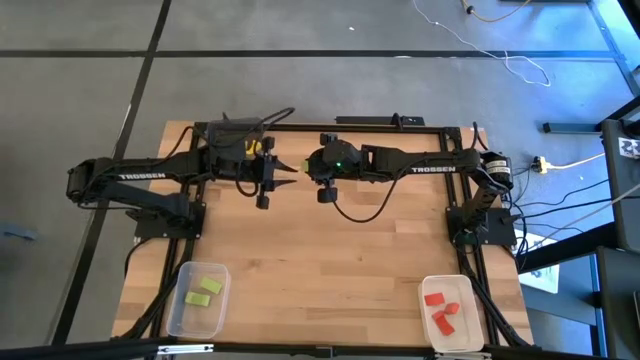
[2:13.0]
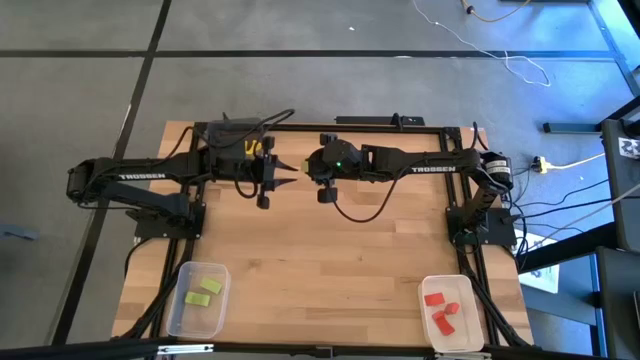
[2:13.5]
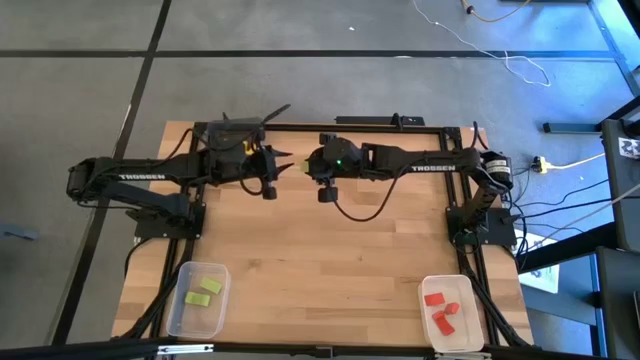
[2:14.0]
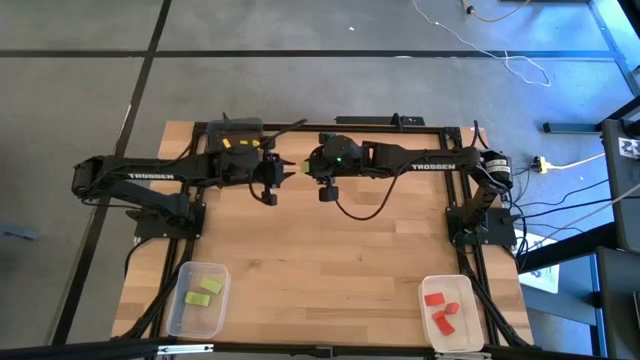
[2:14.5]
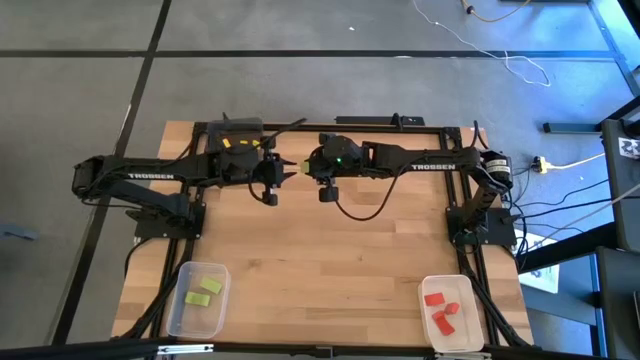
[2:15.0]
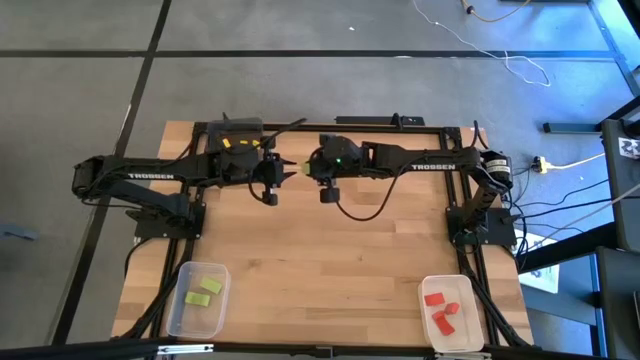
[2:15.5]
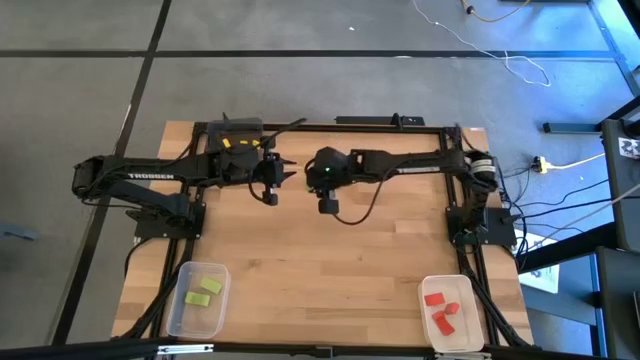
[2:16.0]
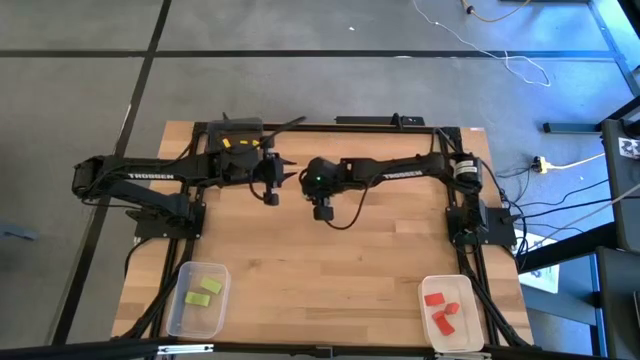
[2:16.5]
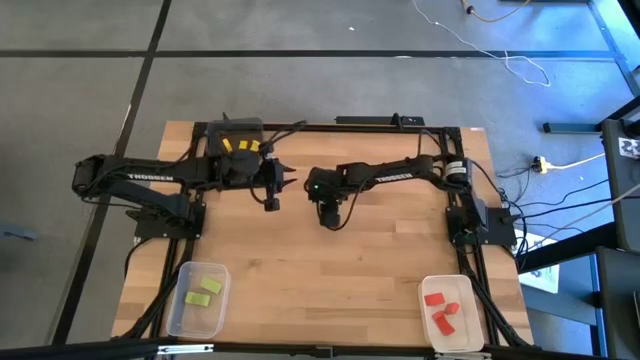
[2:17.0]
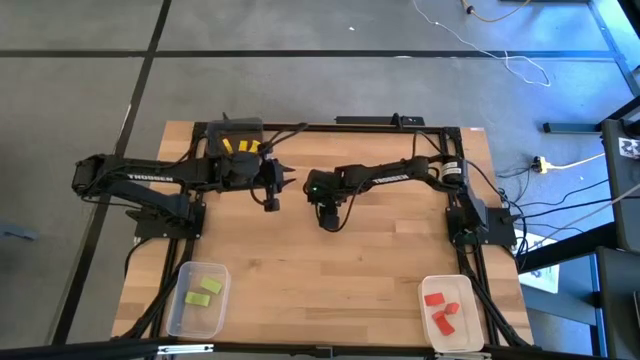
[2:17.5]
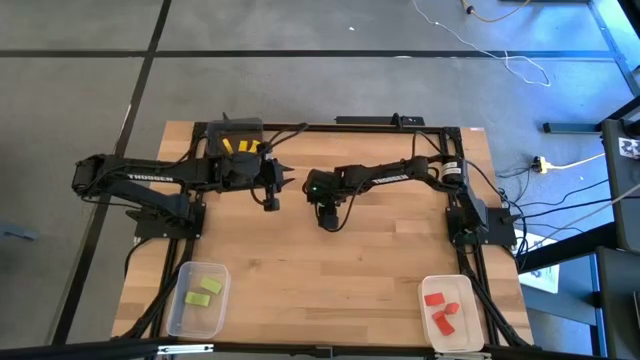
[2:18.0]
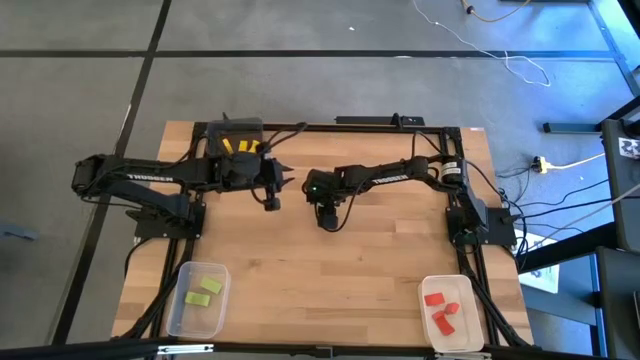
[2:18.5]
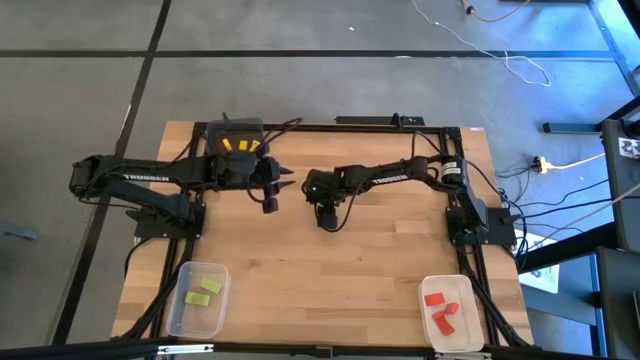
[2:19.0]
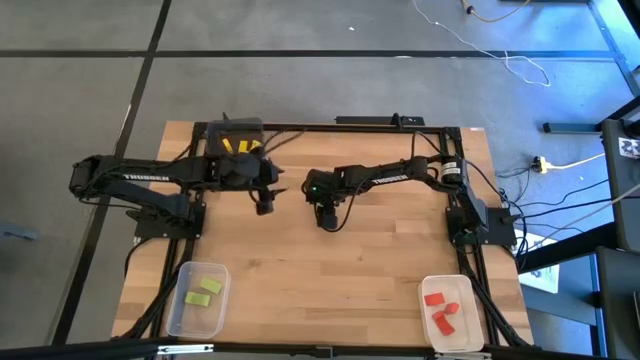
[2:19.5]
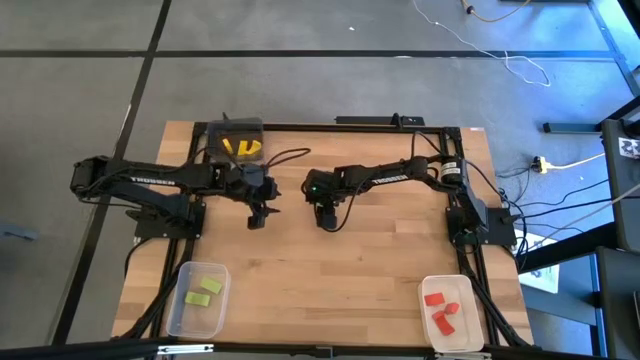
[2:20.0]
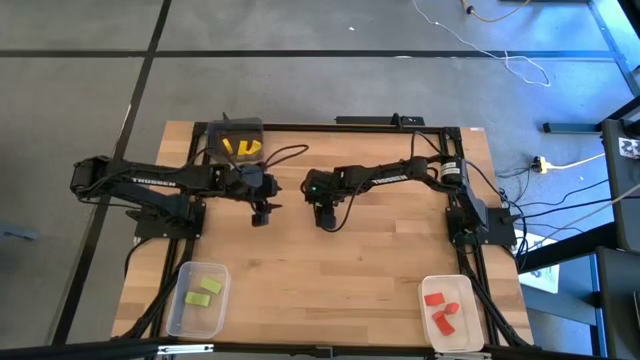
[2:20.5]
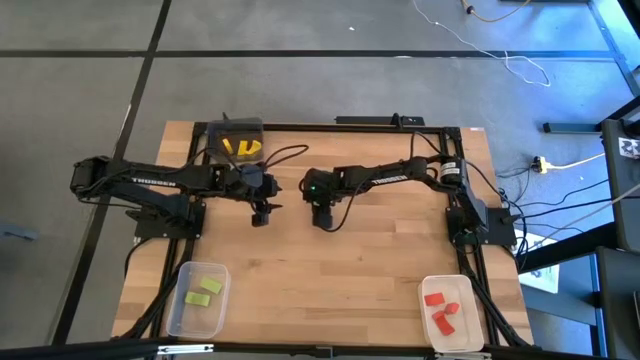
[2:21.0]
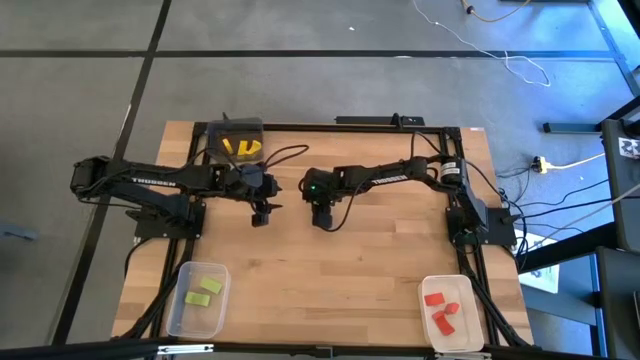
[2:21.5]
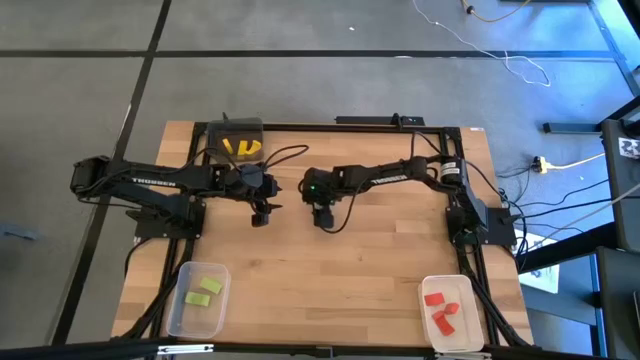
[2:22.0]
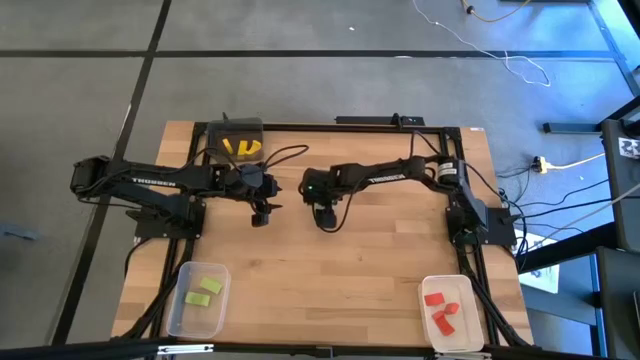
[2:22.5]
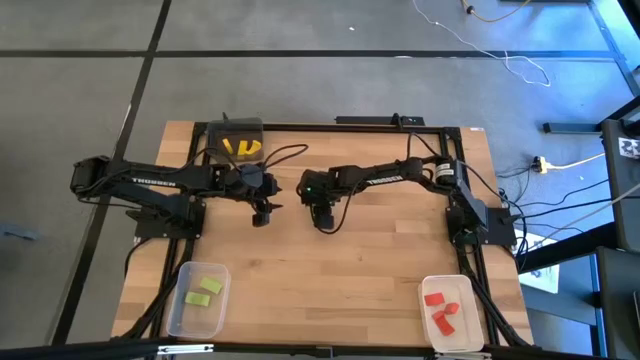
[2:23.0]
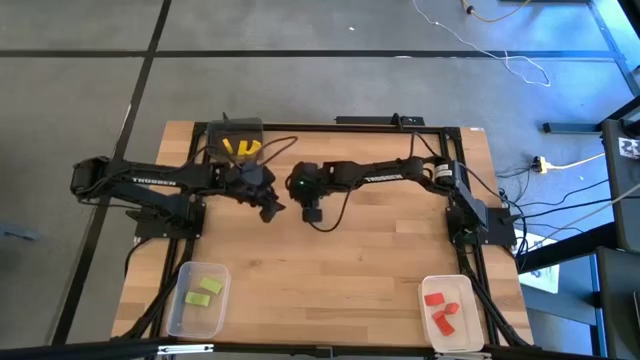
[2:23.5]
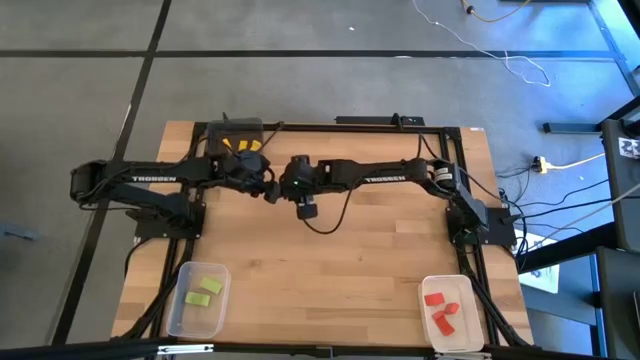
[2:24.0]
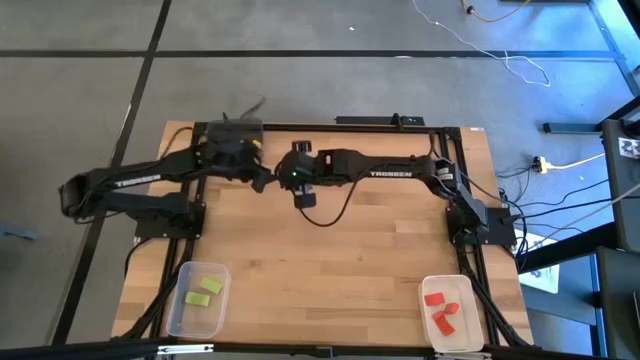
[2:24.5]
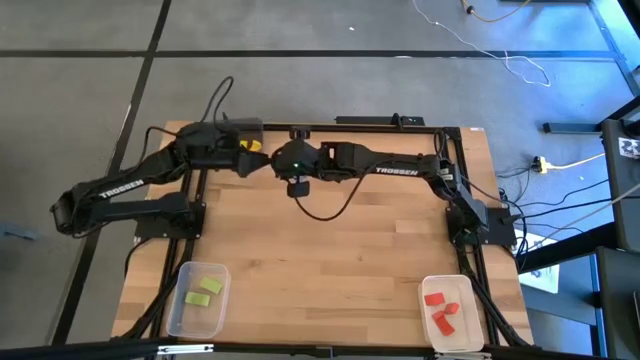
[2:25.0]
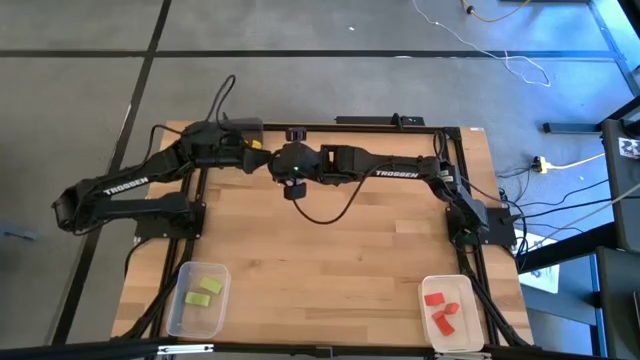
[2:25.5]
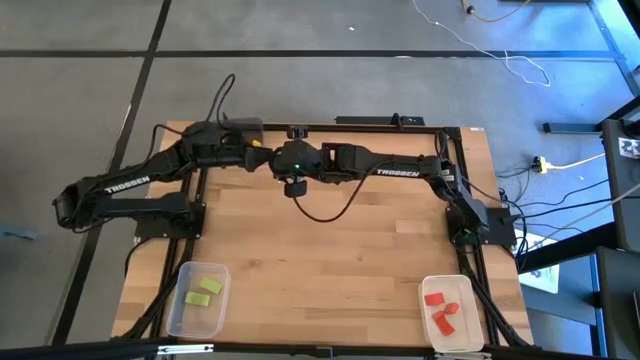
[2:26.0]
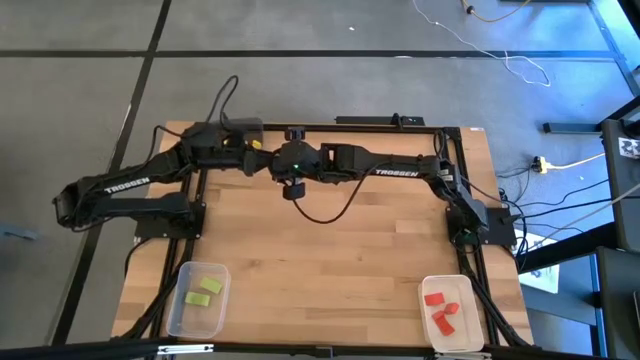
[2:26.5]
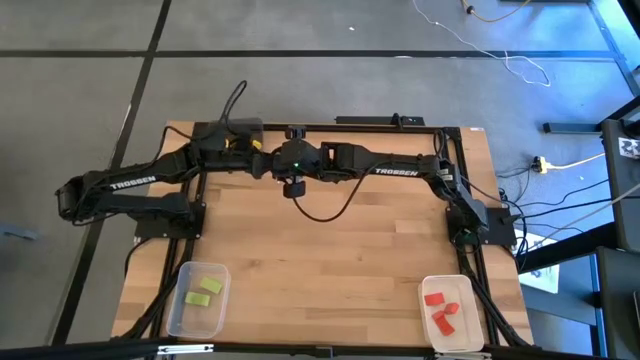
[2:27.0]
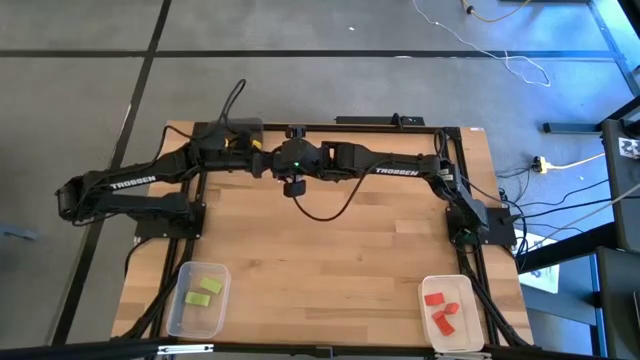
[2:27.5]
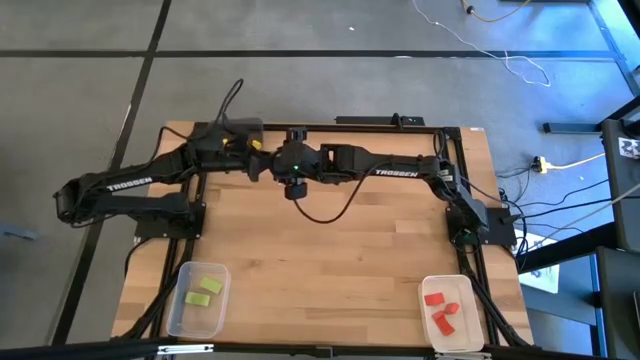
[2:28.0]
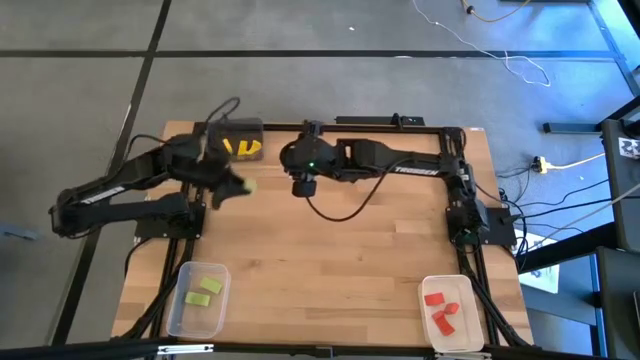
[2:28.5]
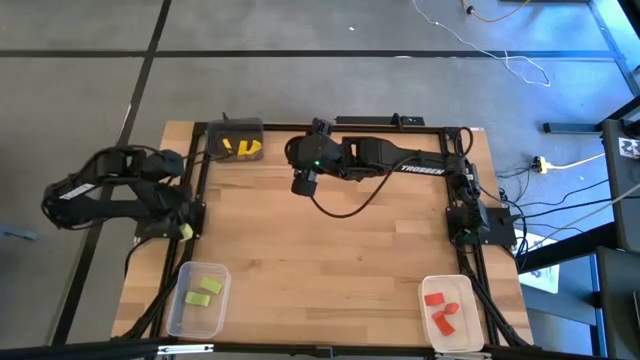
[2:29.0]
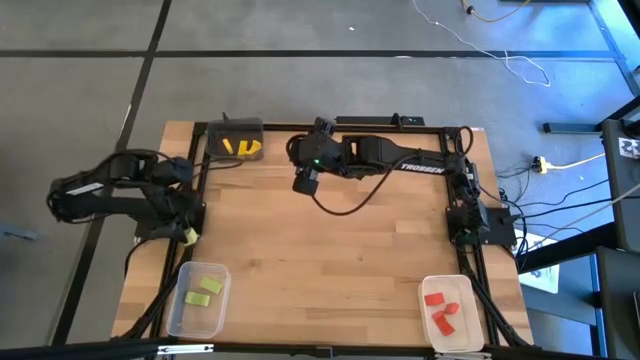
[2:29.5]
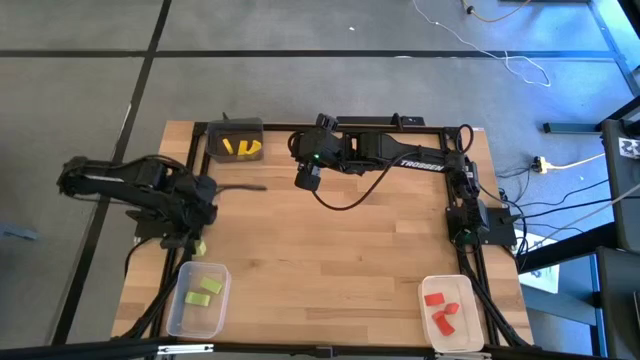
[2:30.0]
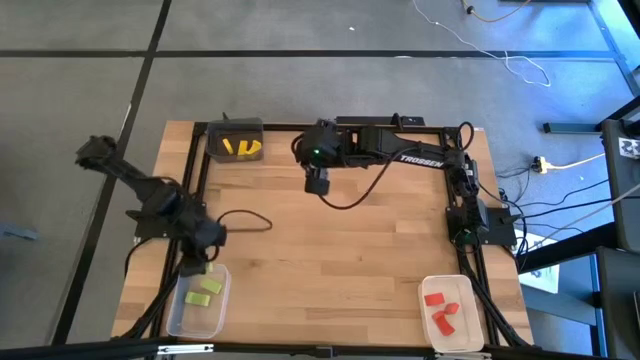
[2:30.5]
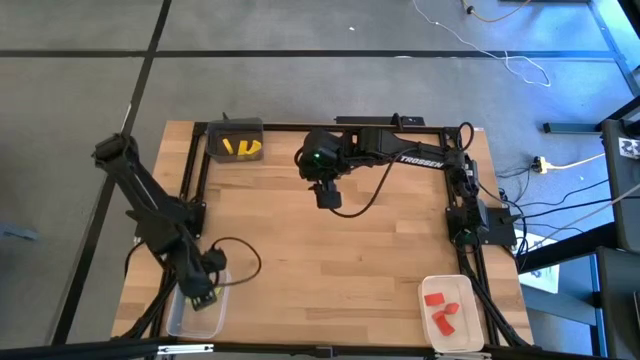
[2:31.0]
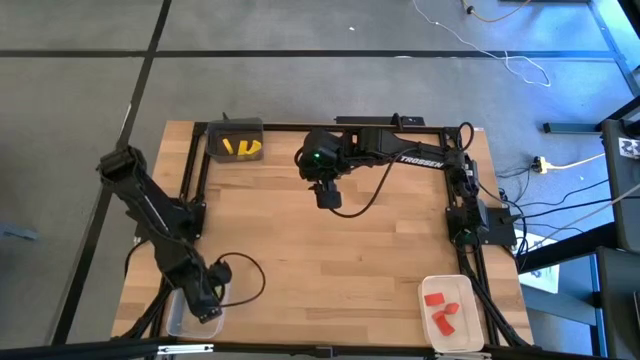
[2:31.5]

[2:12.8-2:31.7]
Task: Sort & place blocks by color
Put the green block into the transparent bin

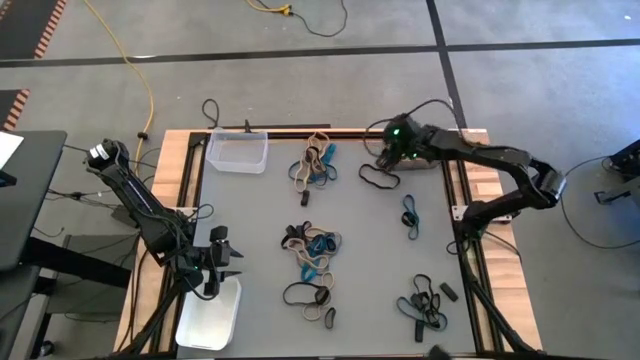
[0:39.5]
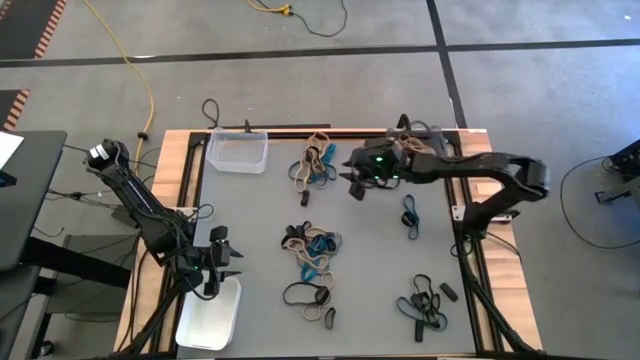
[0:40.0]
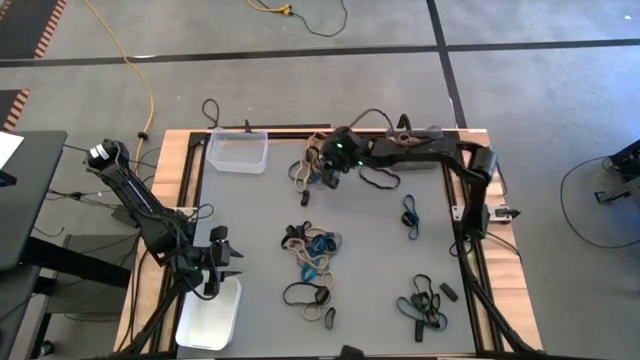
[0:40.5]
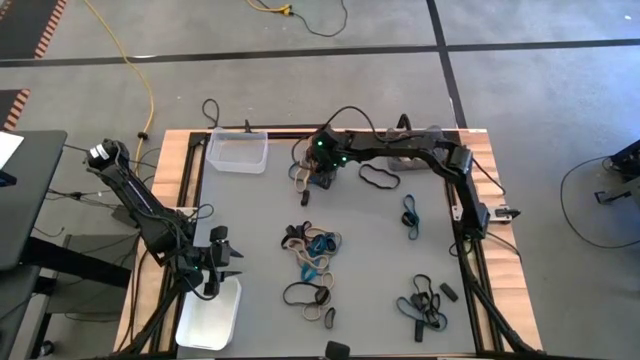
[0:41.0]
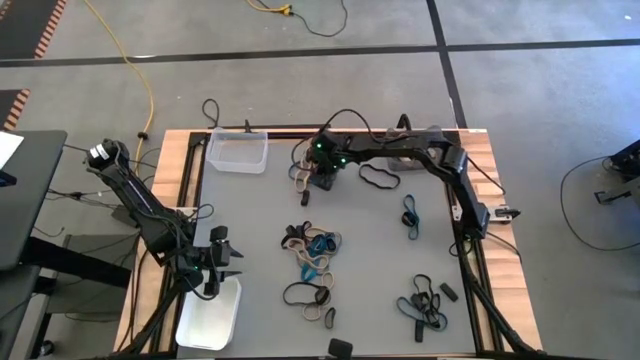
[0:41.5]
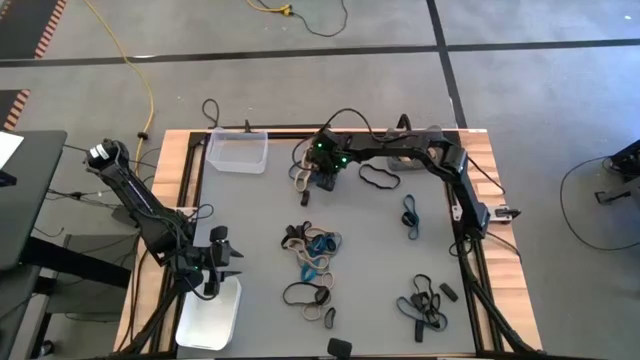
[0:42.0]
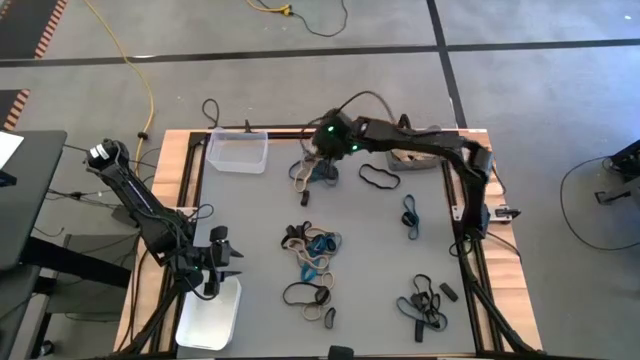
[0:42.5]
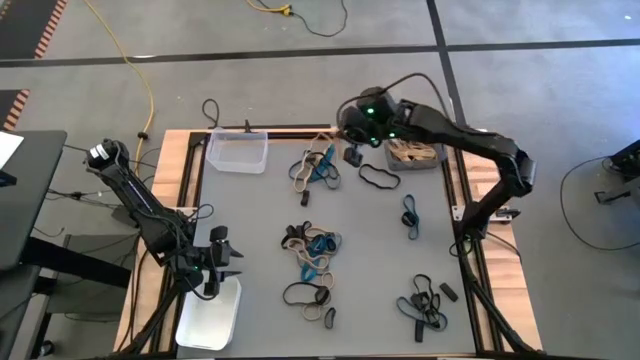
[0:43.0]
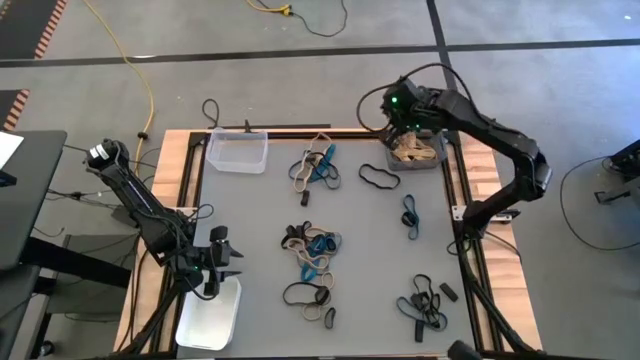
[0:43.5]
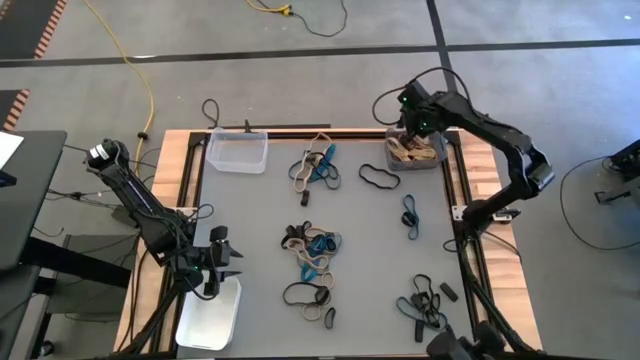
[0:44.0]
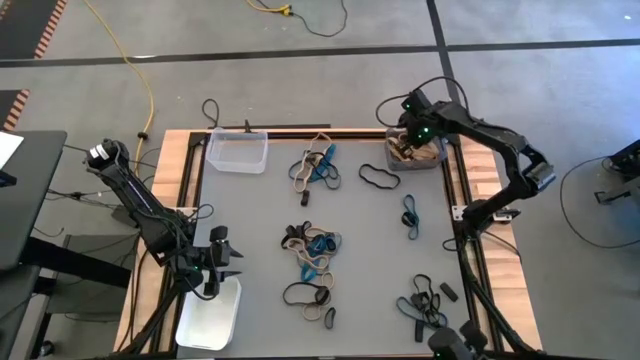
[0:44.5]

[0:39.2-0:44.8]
Task: Sort rubber bands into baskets
Put the white rubber band into the black transparent bin
